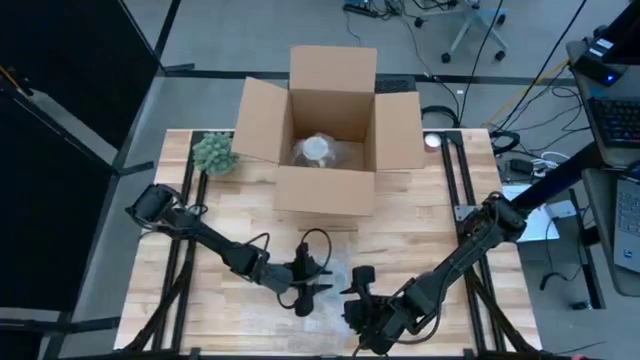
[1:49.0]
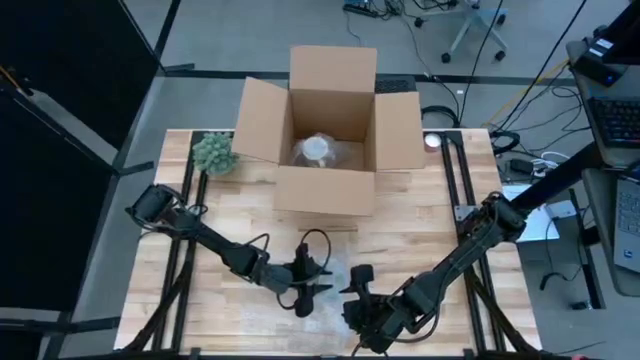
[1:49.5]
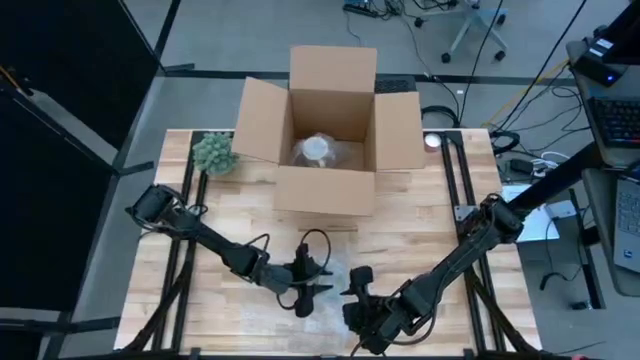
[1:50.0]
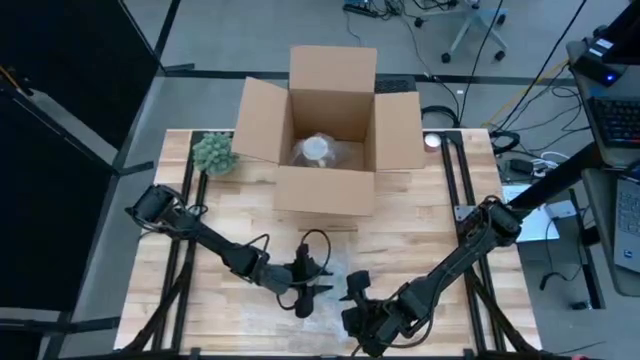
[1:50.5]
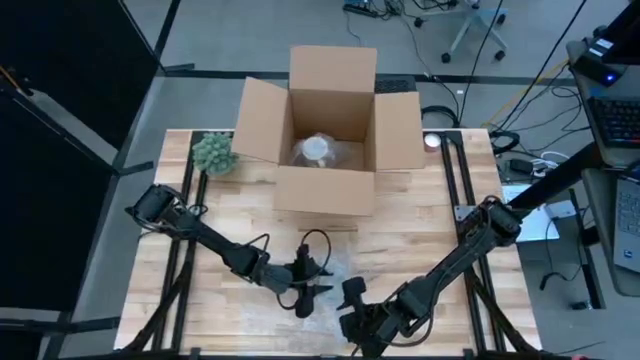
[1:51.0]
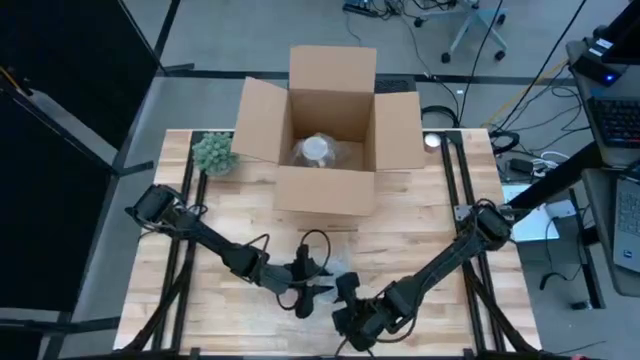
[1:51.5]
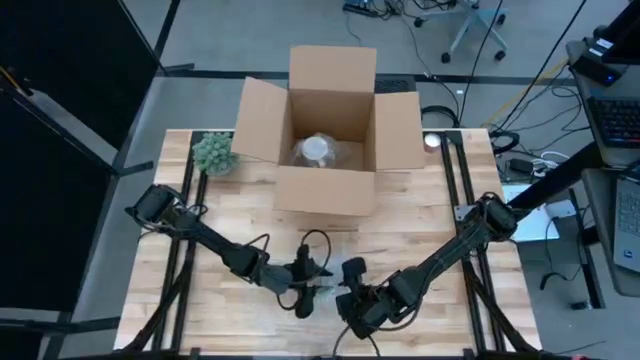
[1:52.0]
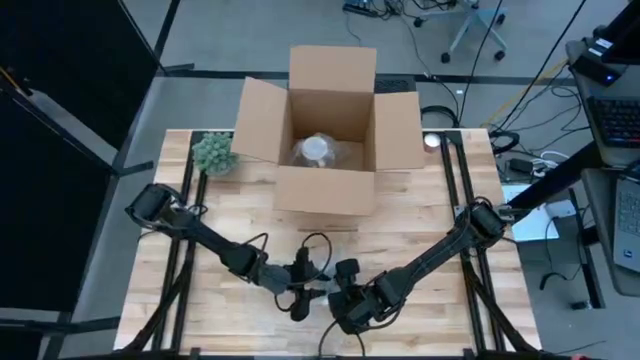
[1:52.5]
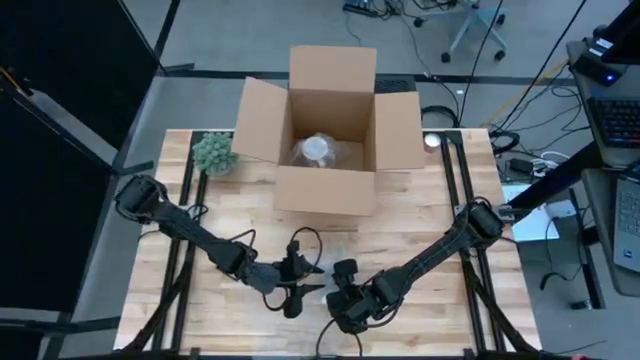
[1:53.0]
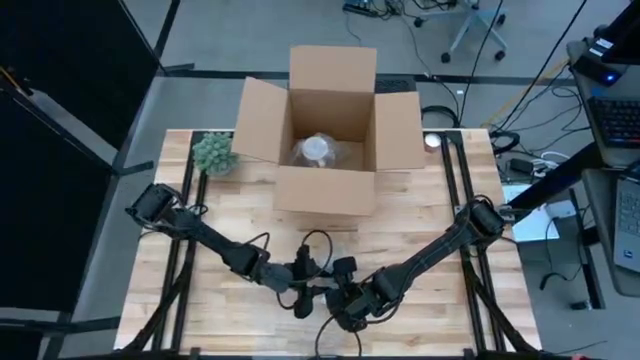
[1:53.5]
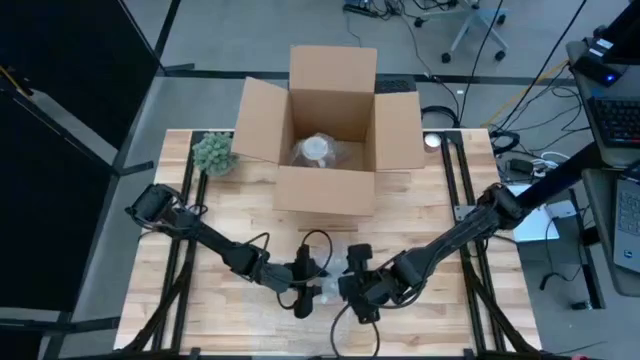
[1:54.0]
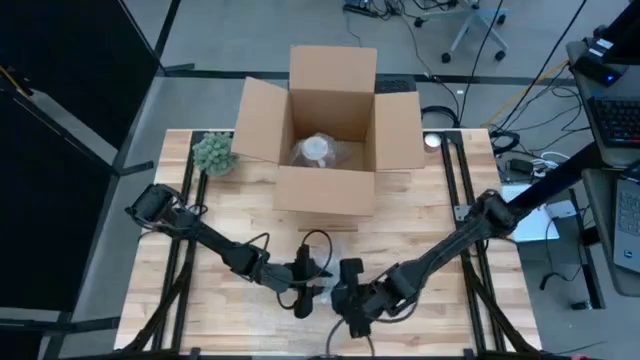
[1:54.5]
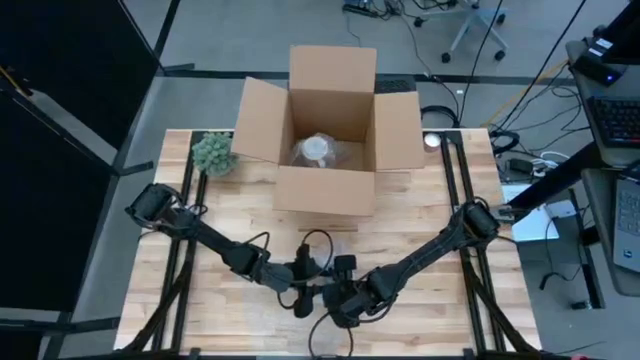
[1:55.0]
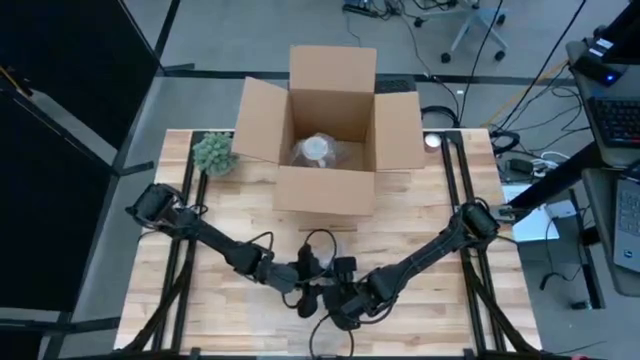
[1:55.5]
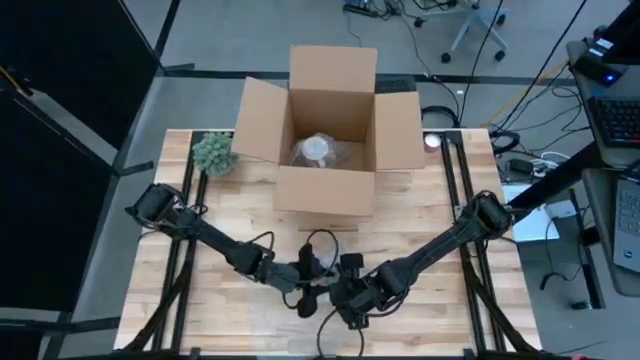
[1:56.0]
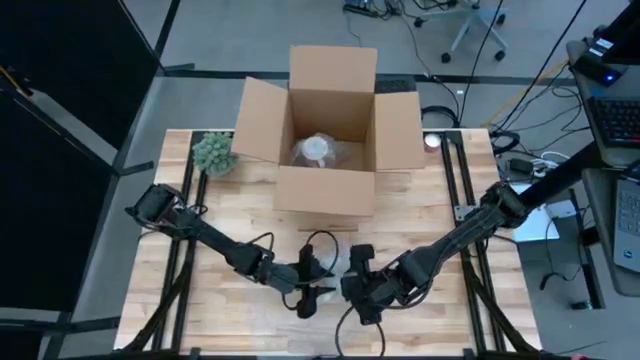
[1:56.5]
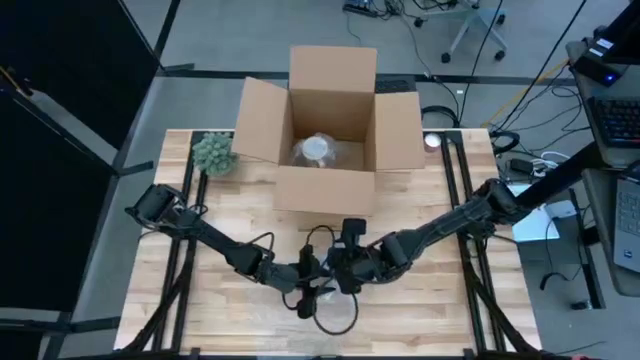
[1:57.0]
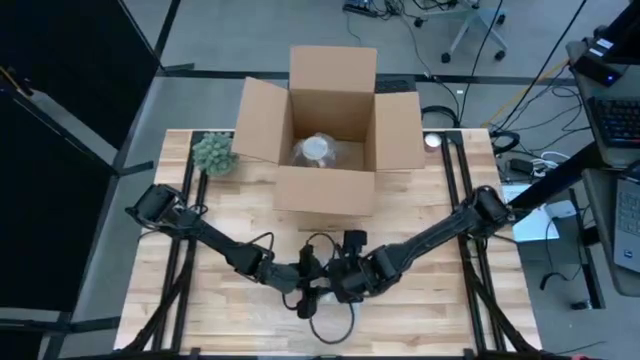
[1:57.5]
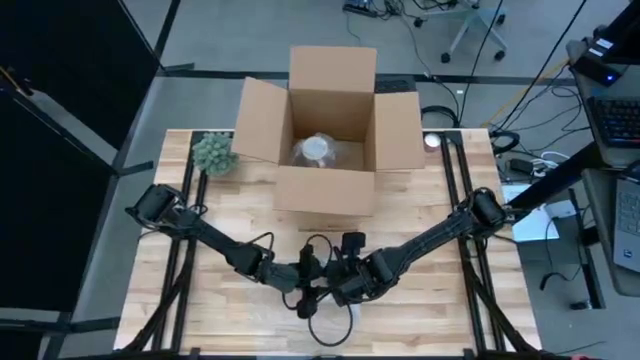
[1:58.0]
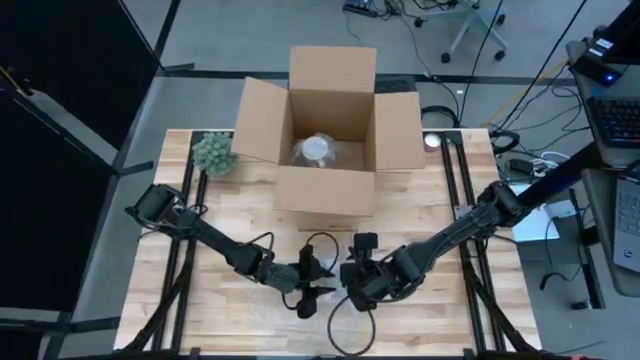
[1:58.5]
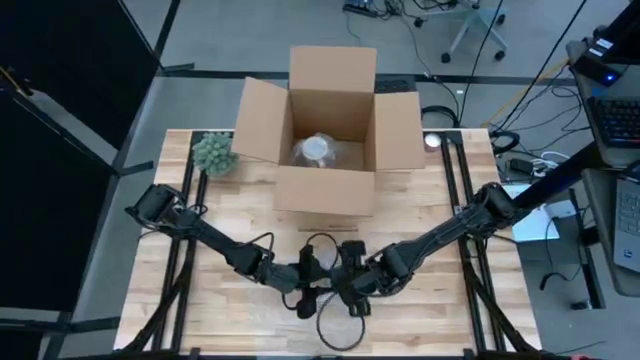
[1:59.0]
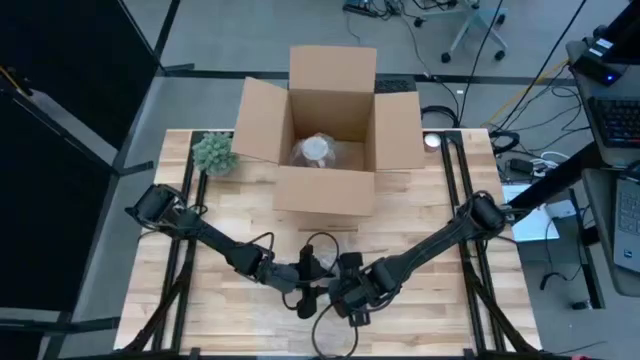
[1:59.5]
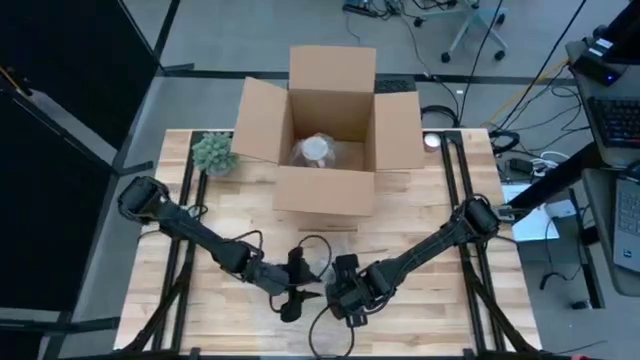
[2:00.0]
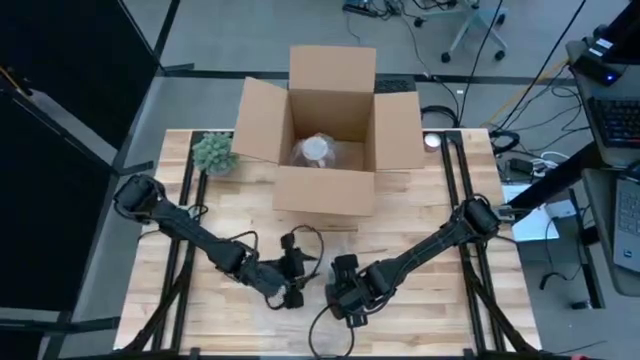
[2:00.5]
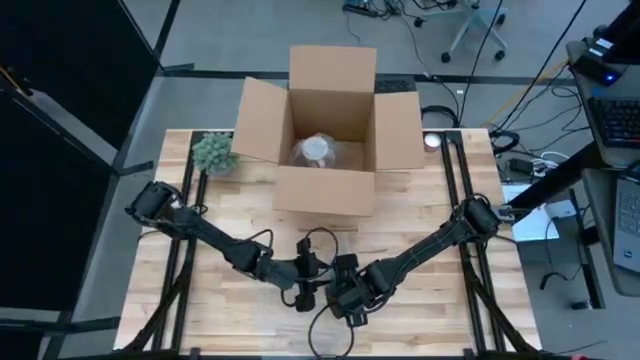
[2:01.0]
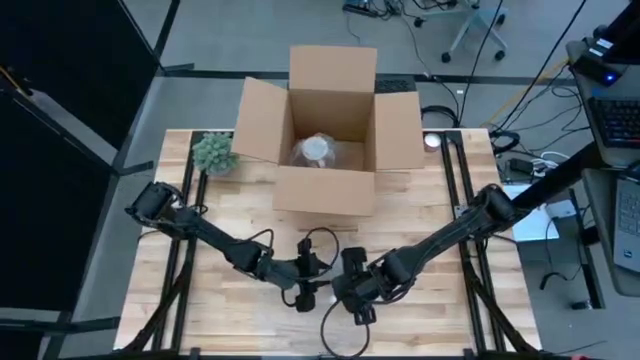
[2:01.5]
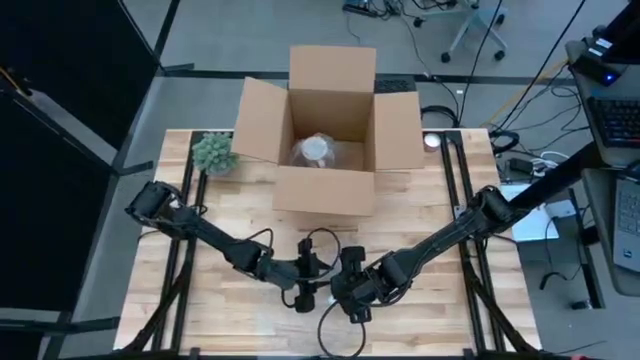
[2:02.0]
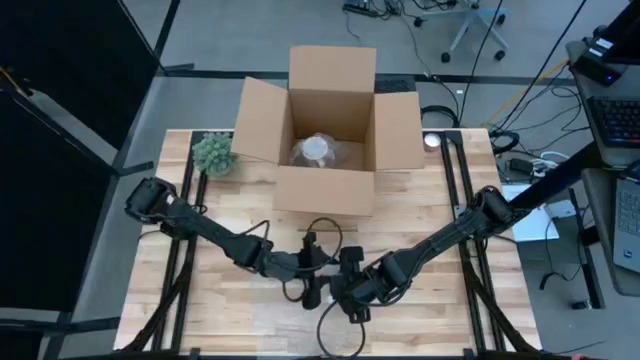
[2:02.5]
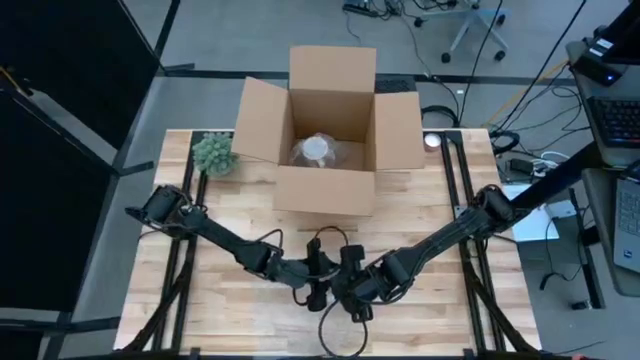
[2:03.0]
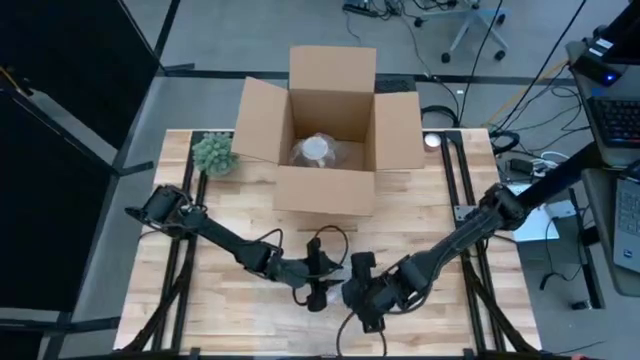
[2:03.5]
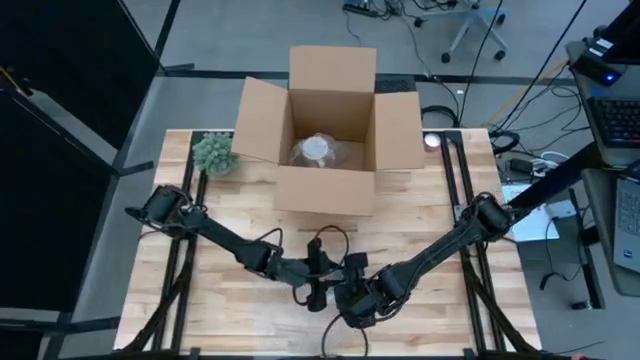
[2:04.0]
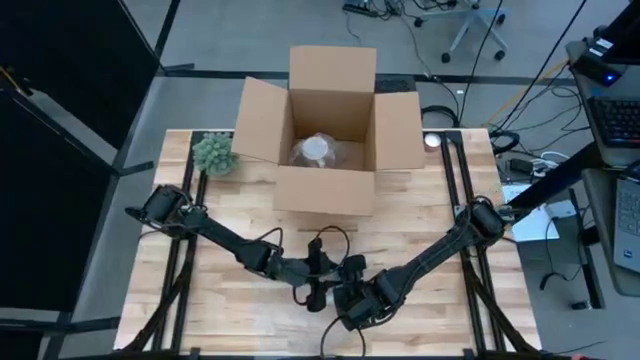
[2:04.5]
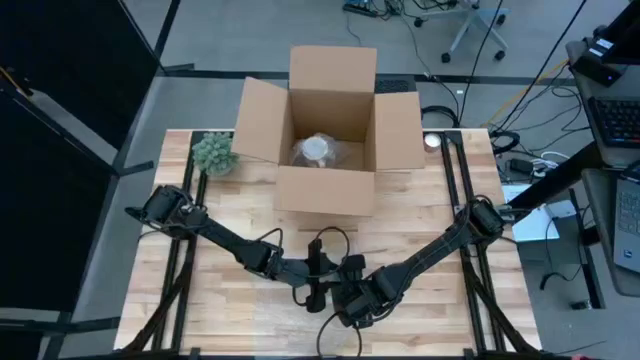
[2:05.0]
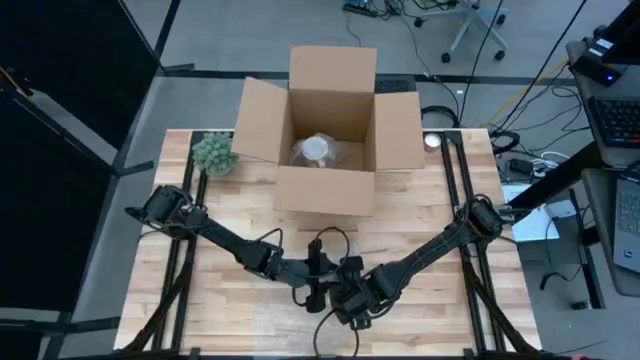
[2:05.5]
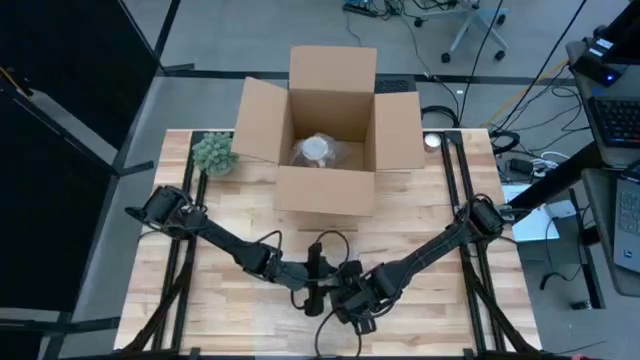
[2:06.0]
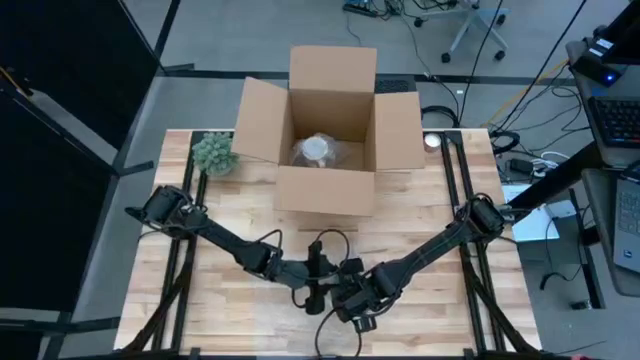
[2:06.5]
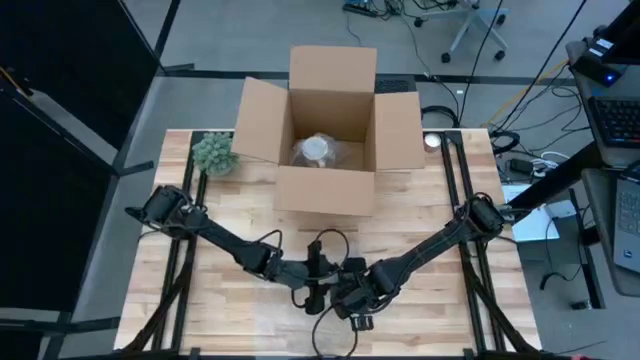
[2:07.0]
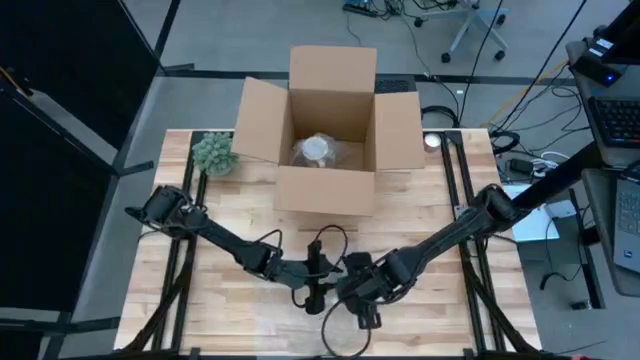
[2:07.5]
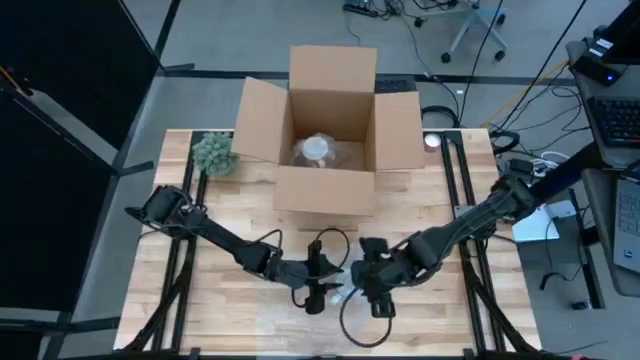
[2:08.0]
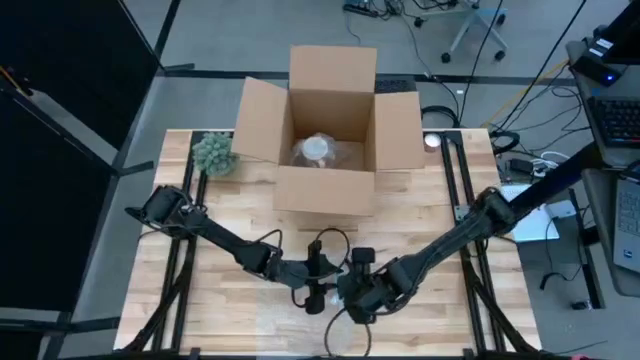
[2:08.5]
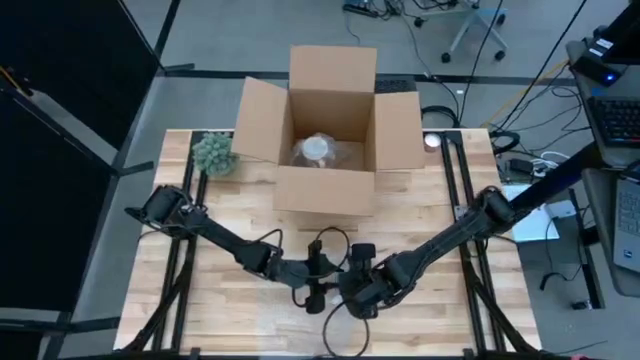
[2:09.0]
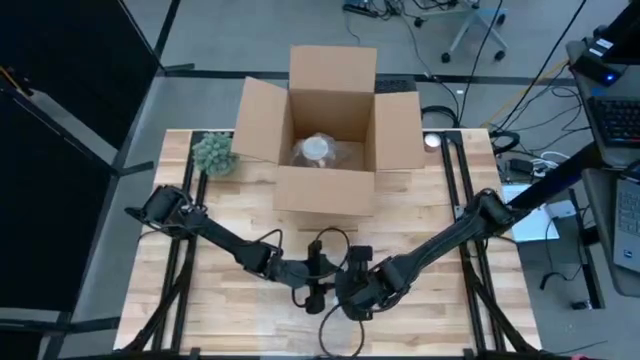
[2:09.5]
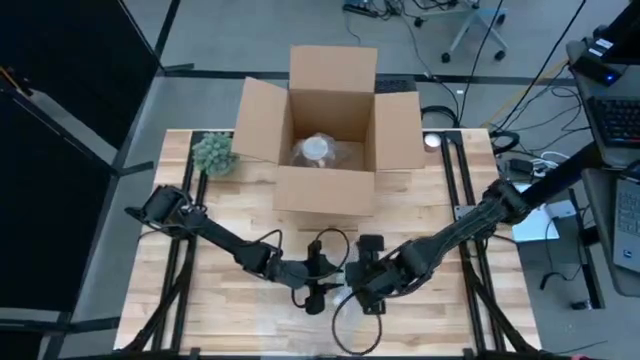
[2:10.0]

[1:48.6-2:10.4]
Task: wrap mug
Wrap the red mug with bubble wrap
